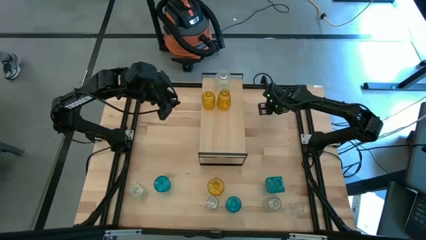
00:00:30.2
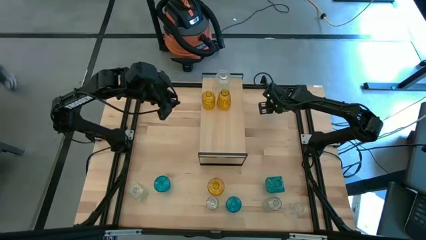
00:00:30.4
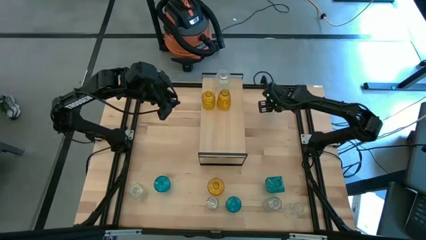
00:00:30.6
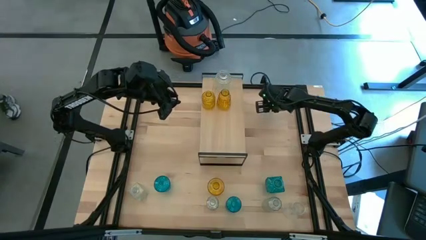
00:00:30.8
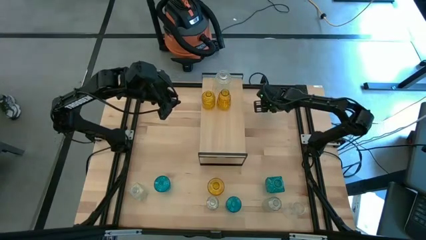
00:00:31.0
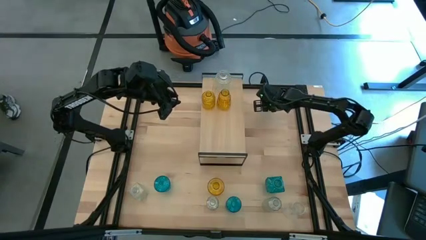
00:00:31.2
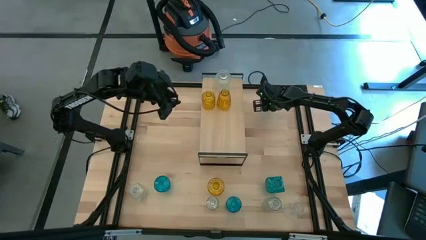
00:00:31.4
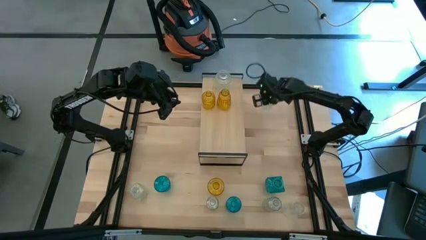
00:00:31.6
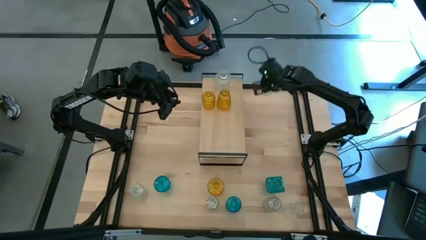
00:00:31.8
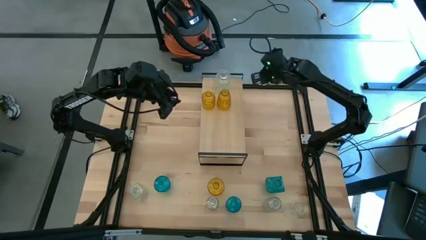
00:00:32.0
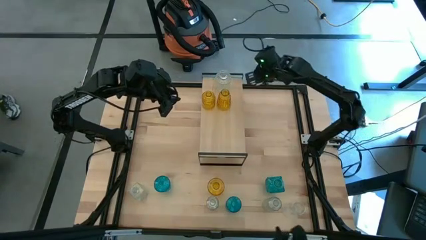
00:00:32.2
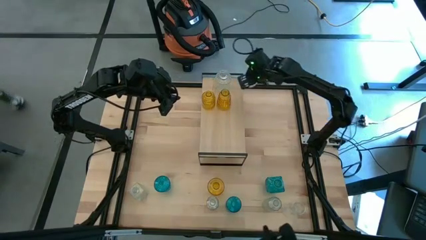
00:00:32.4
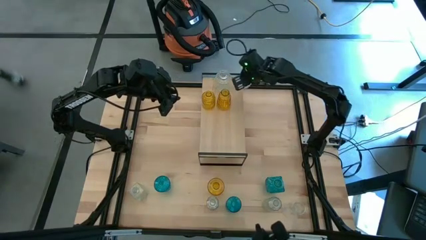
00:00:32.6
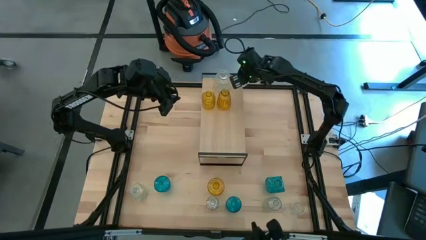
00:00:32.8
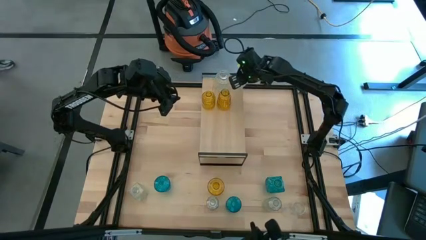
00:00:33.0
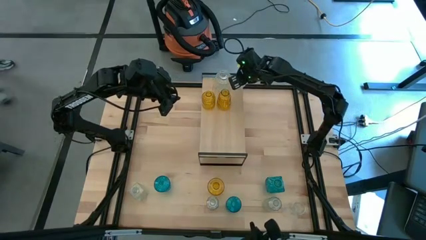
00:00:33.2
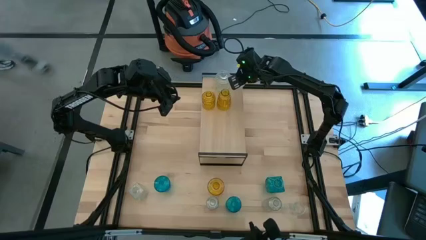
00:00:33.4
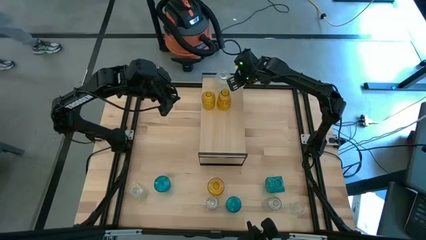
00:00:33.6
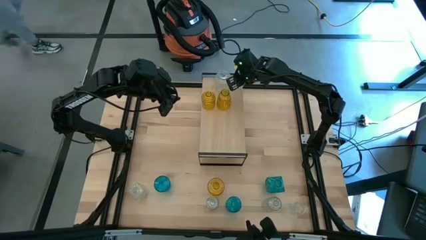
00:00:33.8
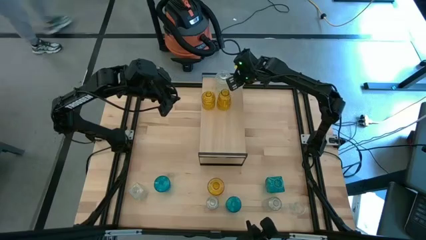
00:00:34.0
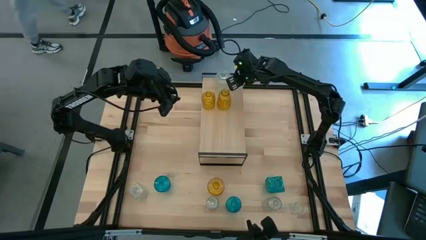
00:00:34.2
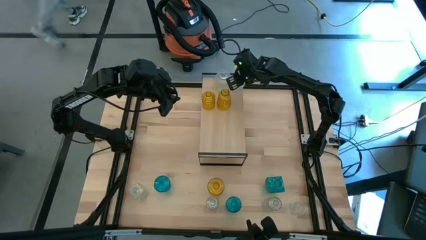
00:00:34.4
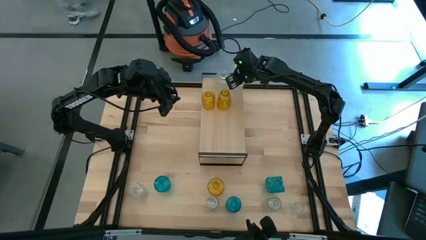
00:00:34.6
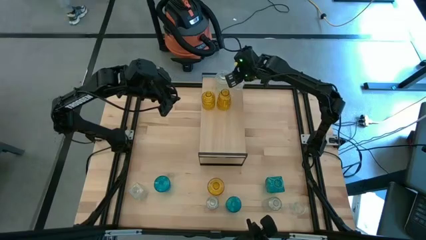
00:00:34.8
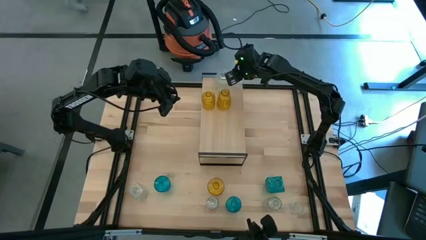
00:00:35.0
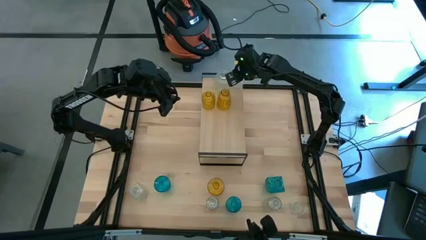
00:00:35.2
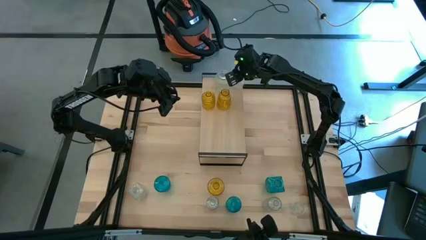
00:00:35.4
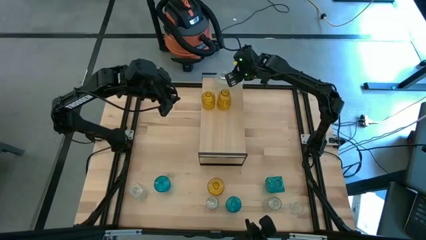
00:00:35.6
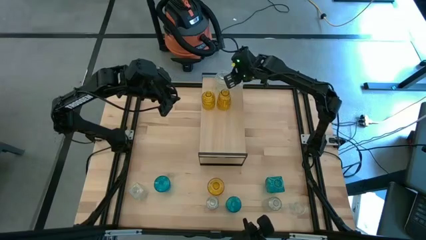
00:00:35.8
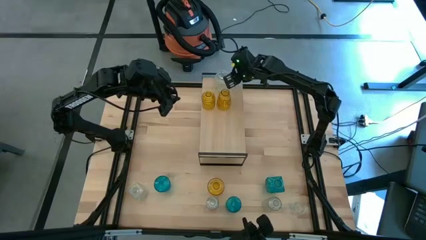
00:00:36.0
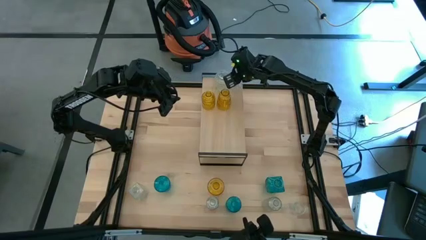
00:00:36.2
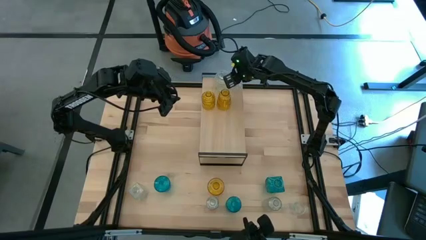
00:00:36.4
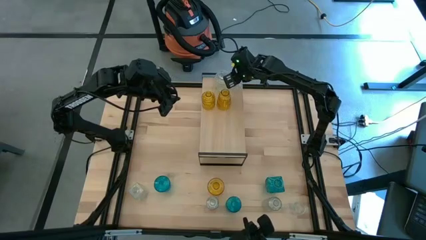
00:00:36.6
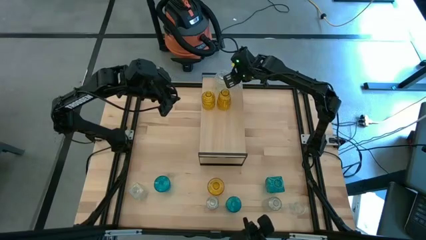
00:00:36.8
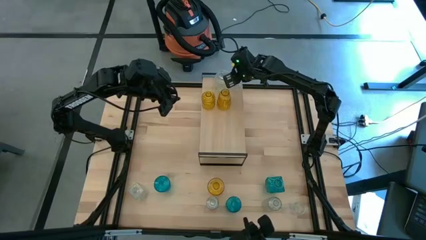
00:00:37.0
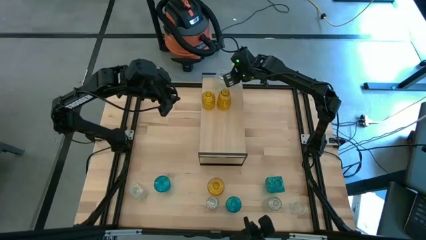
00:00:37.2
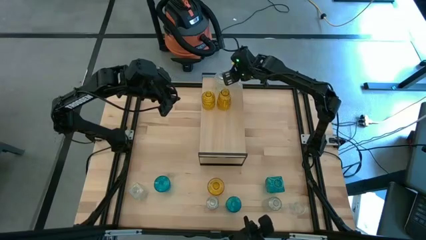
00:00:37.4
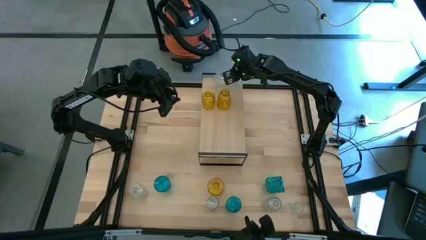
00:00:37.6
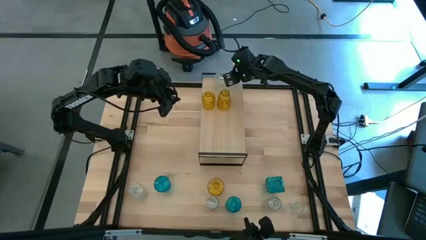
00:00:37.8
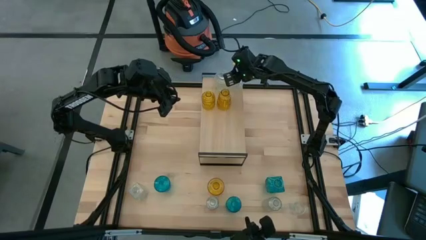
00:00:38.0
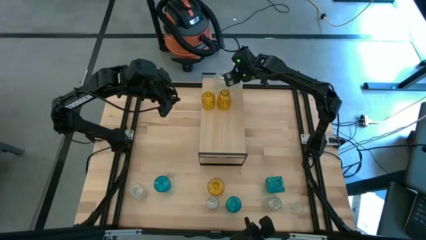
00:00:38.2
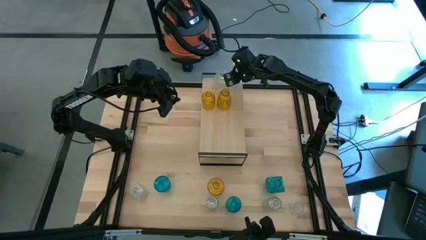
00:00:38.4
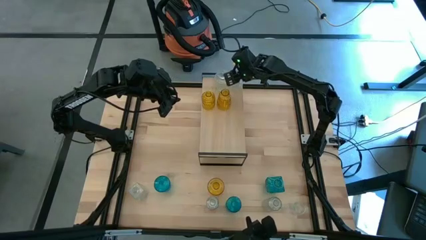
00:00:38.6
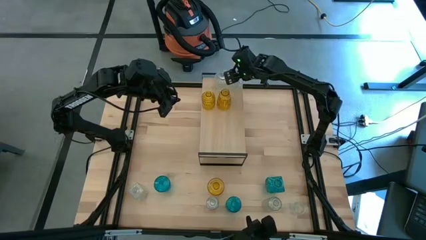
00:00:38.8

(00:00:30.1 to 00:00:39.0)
Task: sort vases onto shelf
Put the transparent glass aligned with the other transparent glass on the shelf

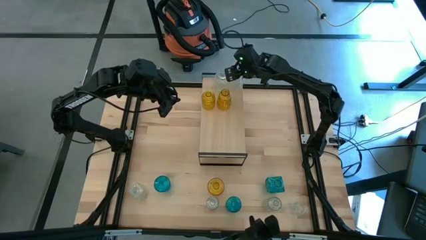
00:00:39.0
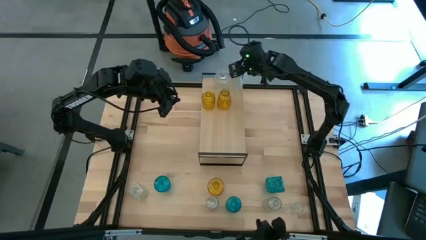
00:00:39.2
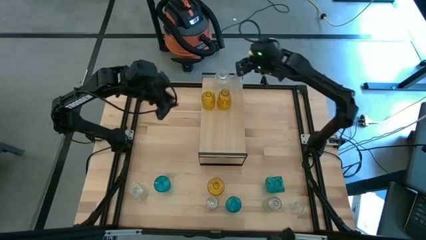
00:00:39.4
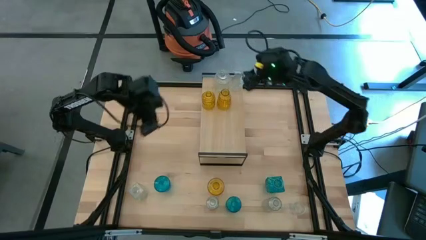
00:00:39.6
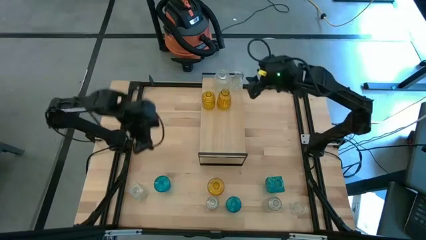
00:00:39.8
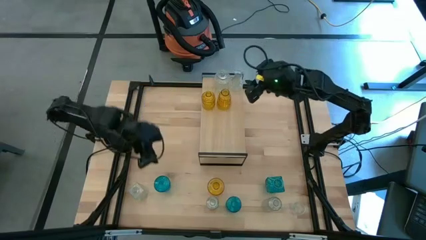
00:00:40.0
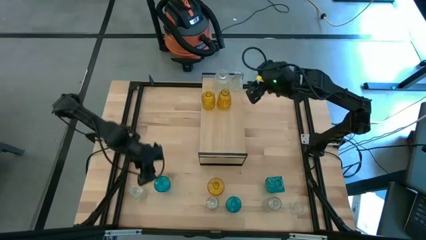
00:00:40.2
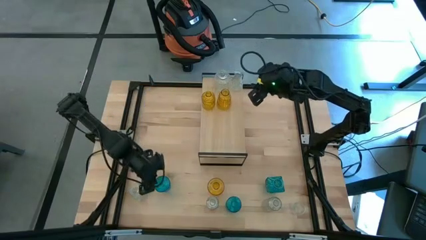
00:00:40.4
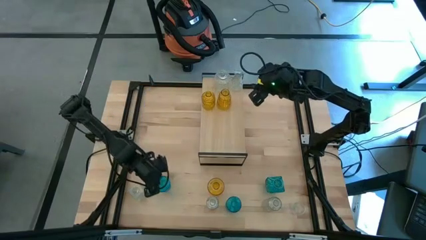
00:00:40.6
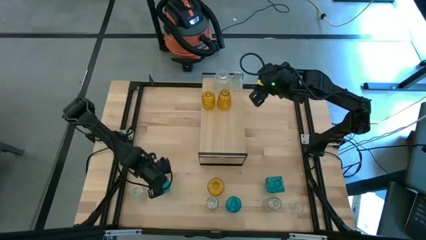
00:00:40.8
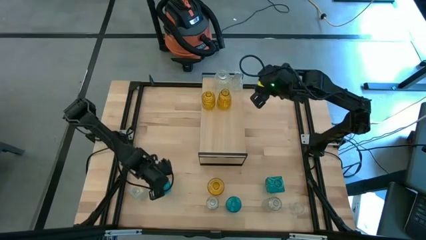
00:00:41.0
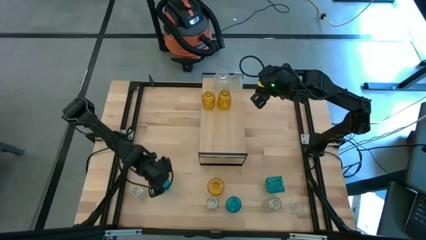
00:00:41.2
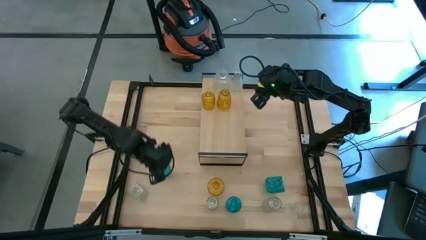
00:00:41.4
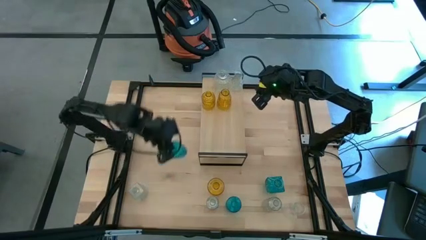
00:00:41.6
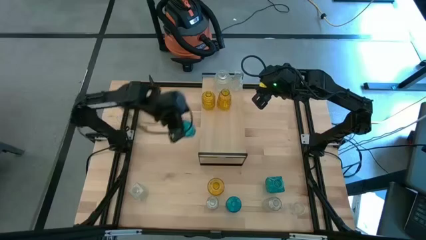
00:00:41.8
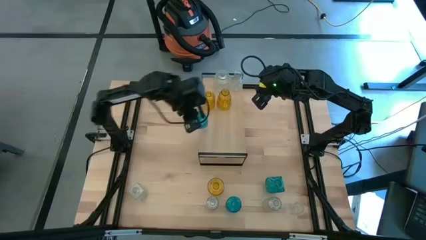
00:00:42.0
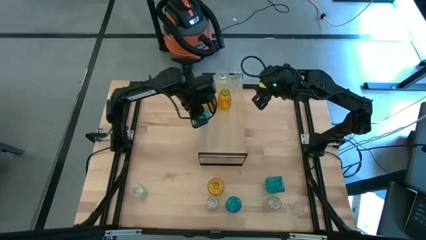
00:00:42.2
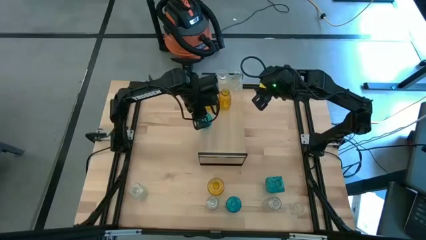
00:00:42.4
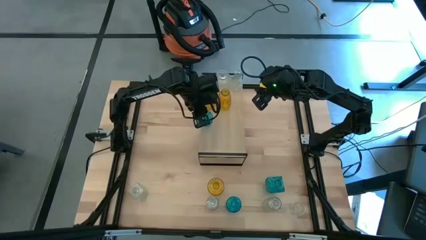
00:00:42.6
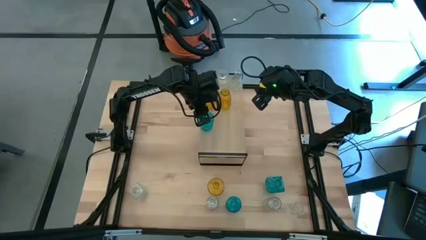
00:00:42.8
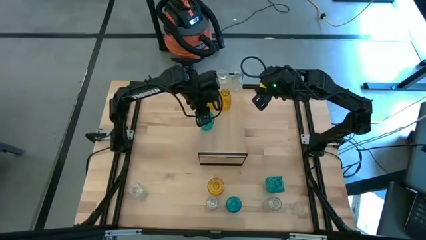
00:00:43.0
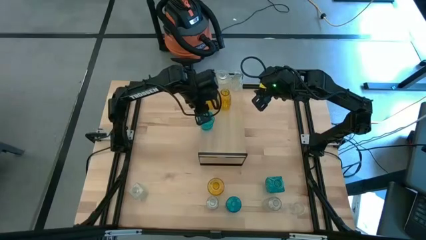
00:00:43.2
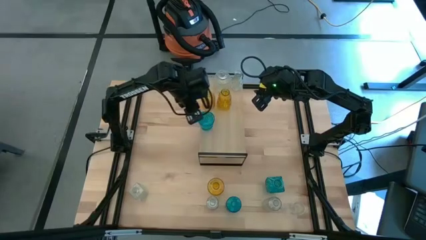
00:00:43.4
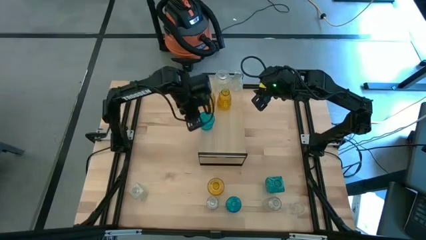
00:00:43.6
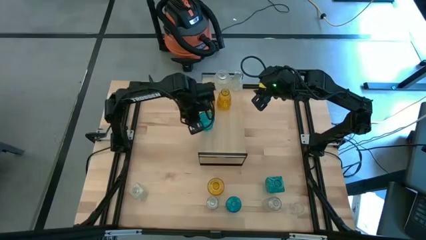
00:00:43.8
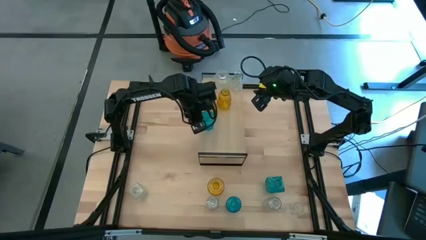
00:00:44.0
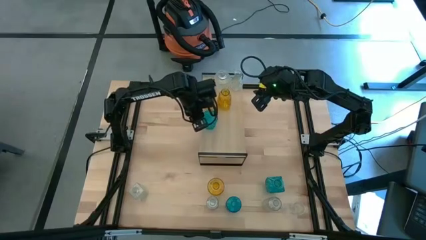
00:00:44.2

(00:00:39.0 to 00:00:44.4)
Put the blue vase on the shelf

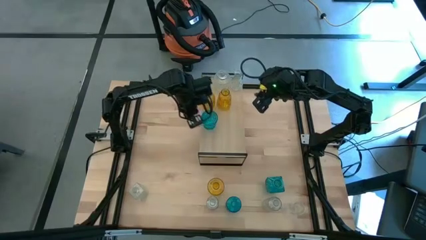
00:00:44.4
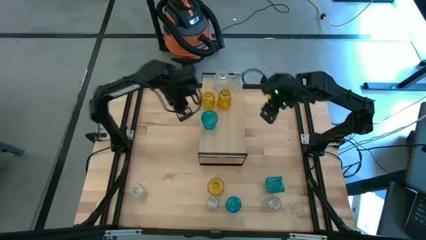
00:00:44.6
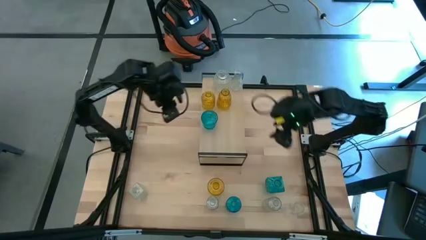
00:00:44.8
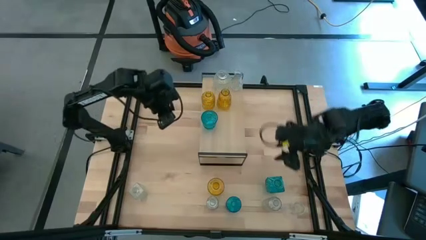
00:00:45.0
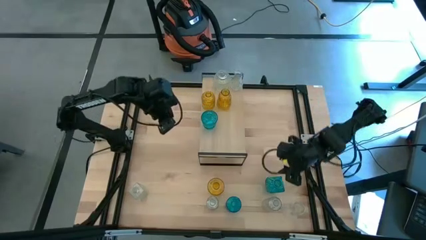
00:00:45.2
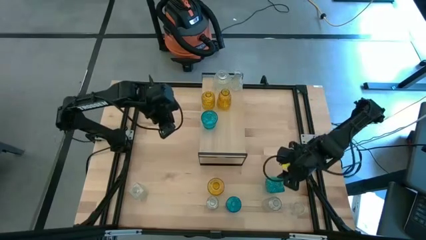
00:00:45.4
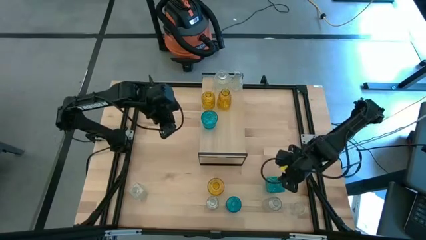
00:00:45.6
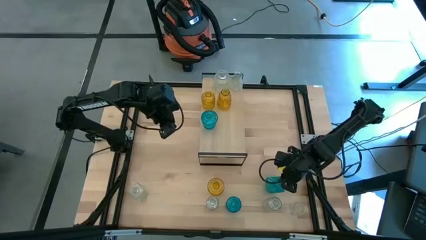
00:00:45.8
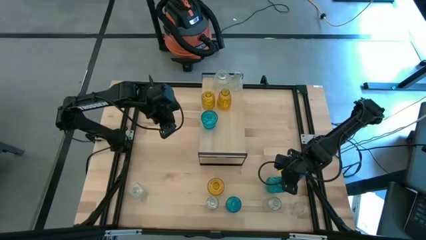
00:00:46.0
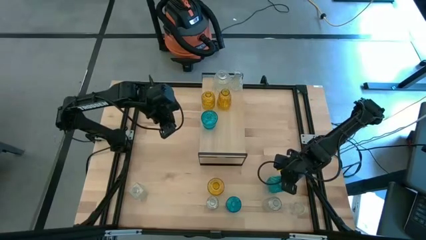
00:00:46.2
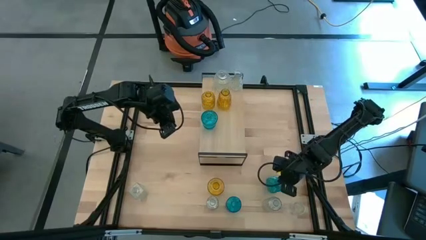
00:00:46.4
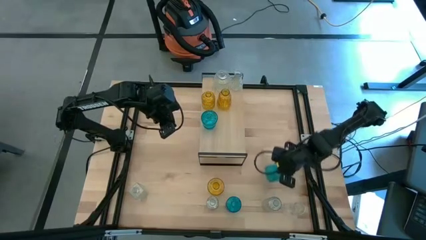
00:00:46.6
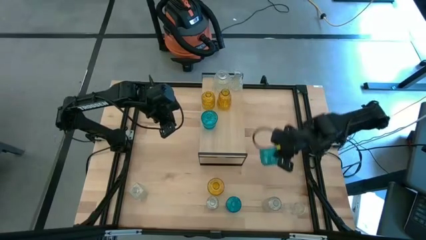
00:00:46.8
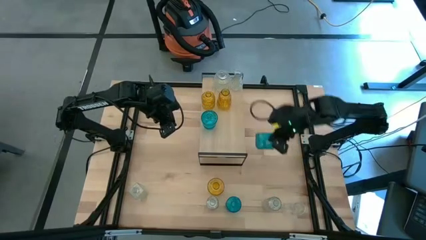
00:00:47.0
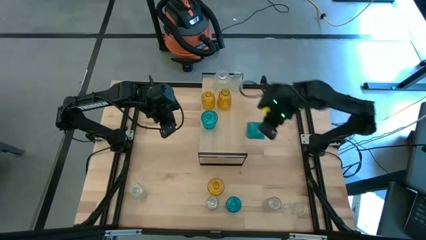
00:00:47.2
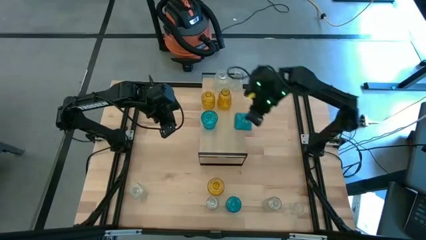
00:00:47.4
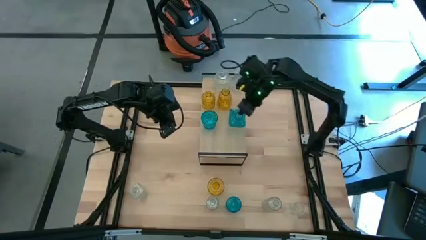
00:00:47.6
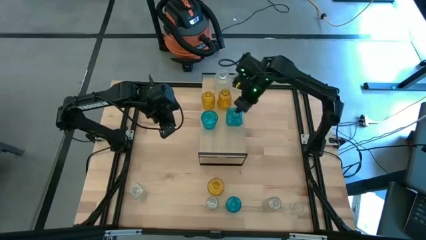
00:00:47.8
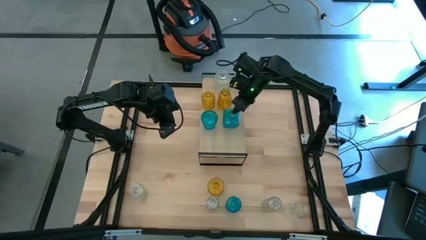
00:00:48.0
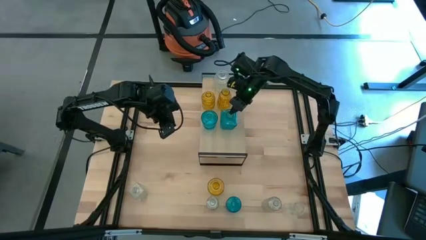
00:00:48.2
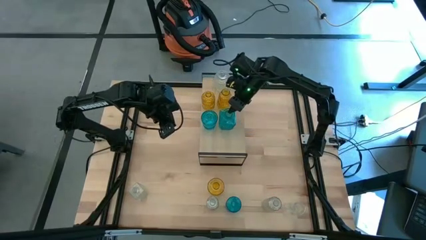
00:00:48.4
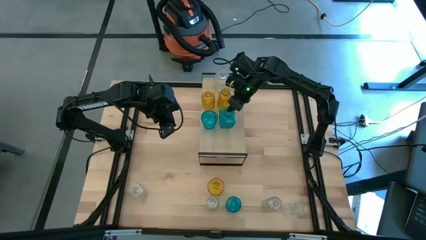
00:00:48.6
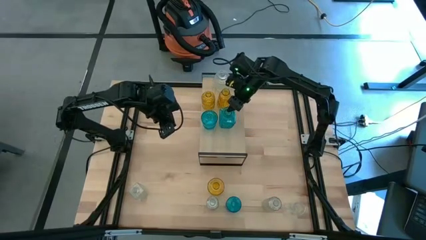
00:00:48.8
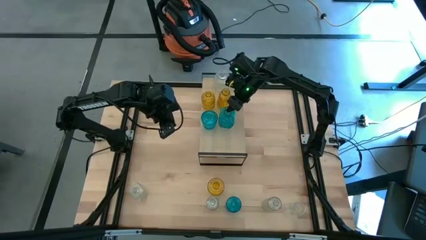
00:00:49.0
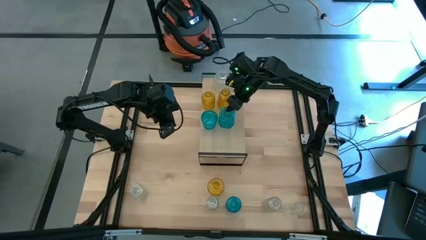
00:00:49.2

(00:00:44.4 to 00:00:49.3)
Put the blue vase on the shelf aligned with the other blue vase
